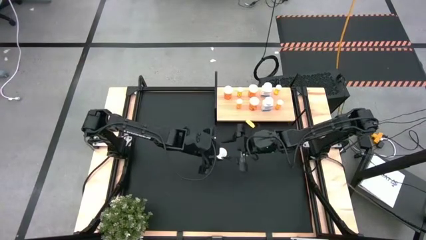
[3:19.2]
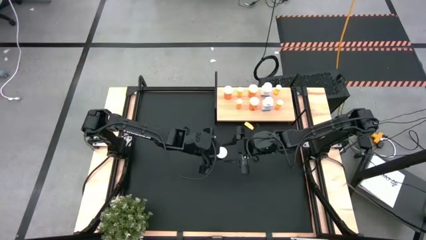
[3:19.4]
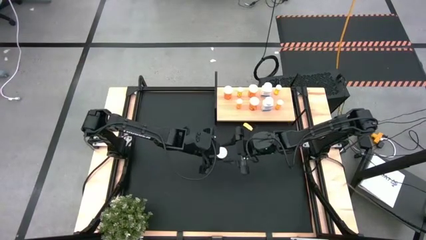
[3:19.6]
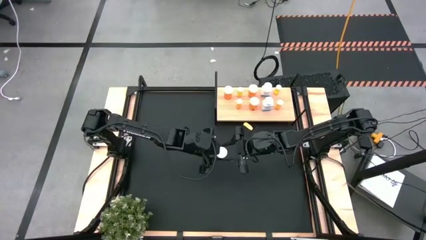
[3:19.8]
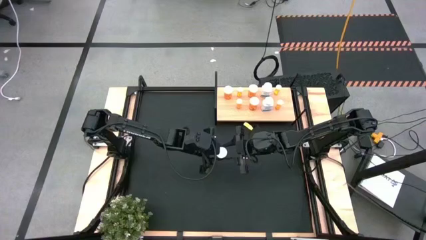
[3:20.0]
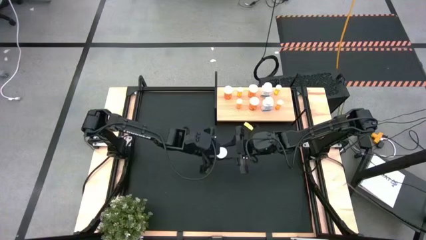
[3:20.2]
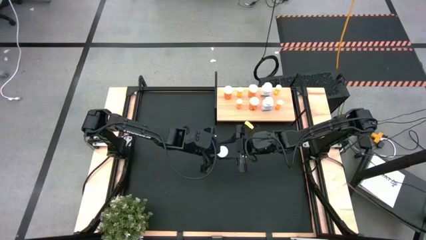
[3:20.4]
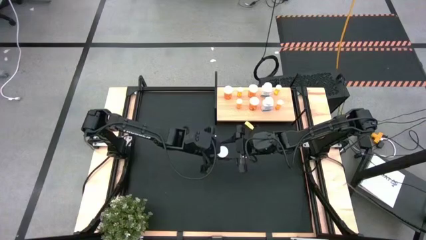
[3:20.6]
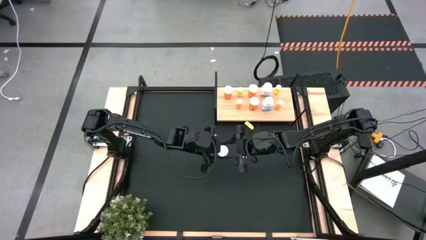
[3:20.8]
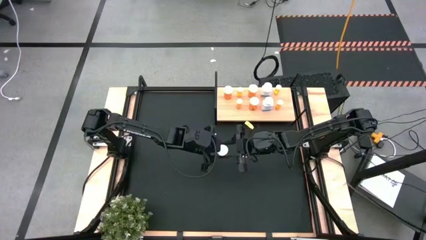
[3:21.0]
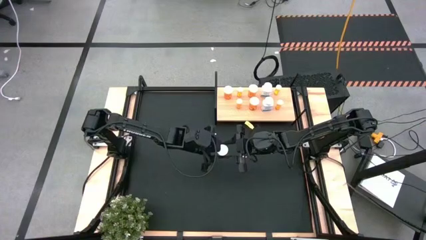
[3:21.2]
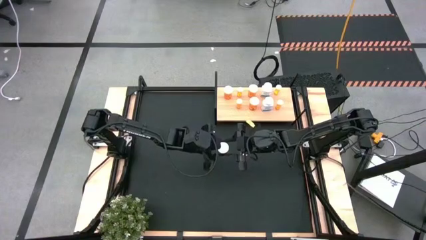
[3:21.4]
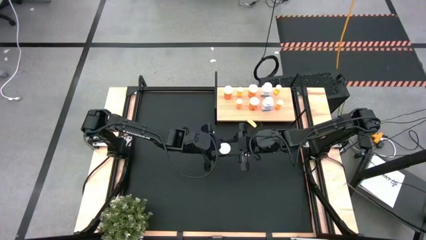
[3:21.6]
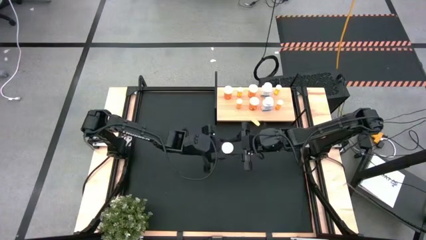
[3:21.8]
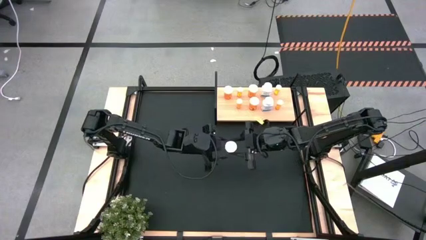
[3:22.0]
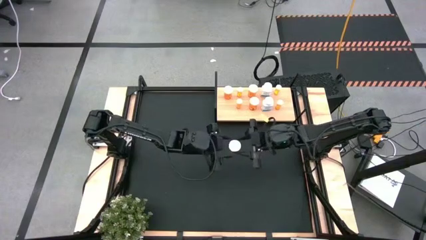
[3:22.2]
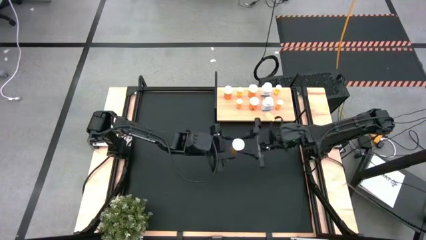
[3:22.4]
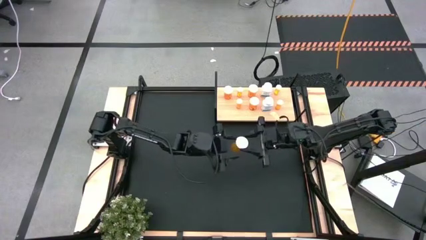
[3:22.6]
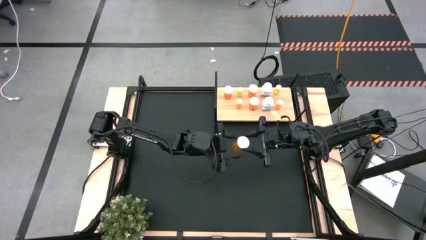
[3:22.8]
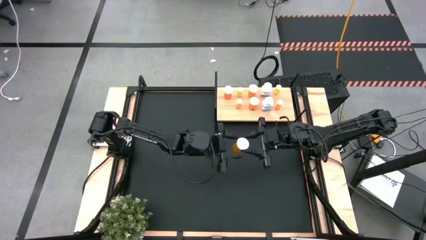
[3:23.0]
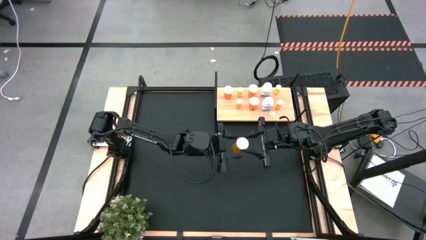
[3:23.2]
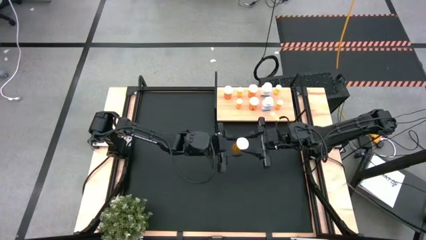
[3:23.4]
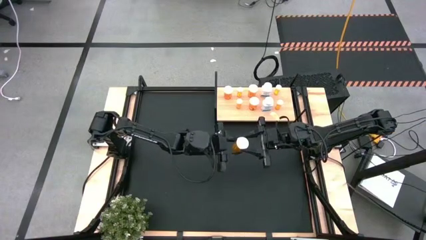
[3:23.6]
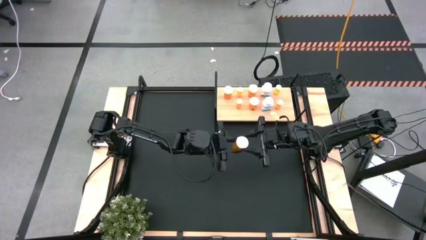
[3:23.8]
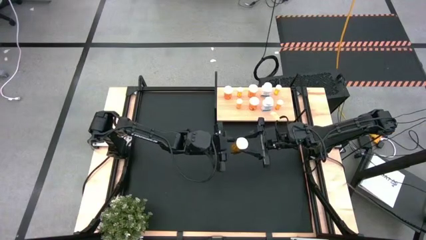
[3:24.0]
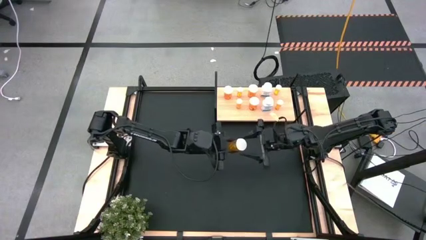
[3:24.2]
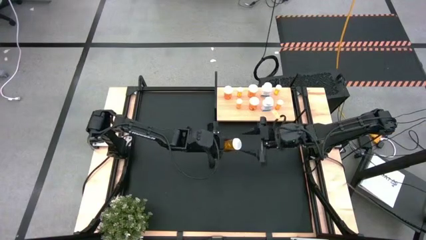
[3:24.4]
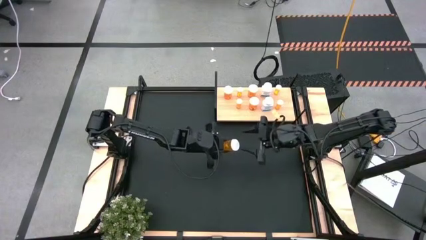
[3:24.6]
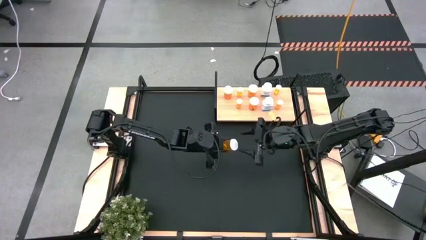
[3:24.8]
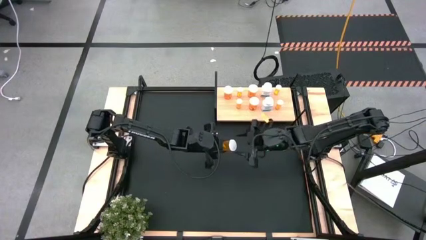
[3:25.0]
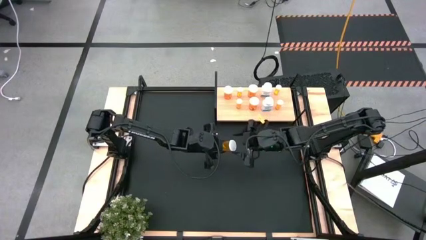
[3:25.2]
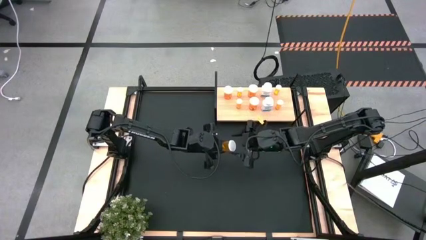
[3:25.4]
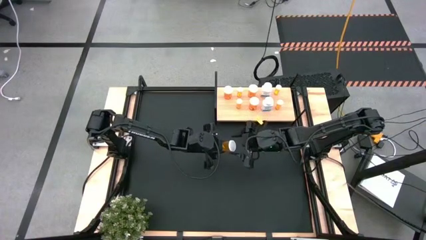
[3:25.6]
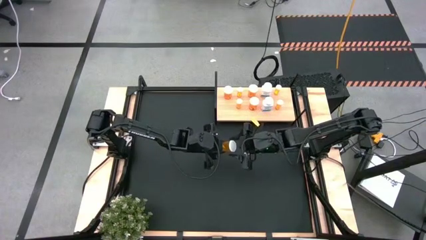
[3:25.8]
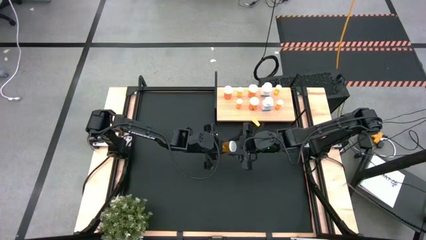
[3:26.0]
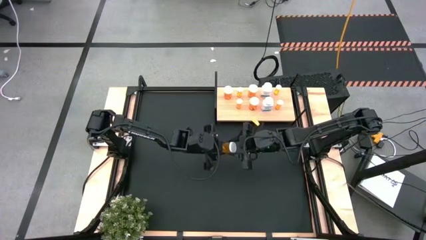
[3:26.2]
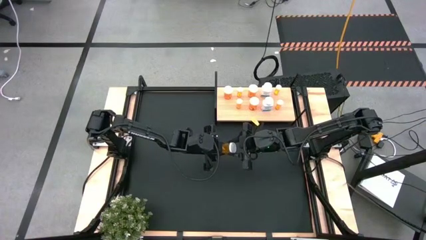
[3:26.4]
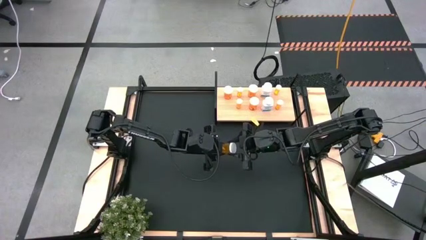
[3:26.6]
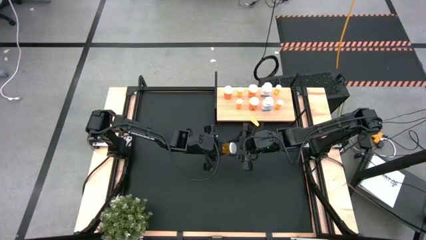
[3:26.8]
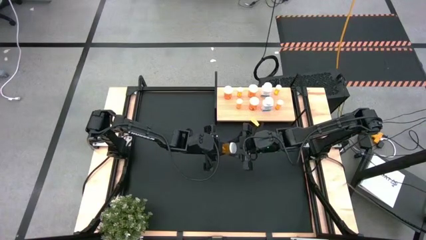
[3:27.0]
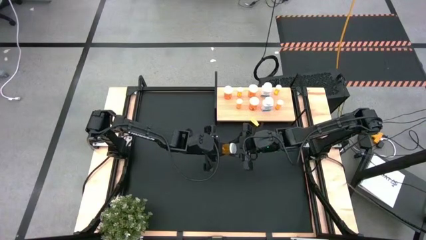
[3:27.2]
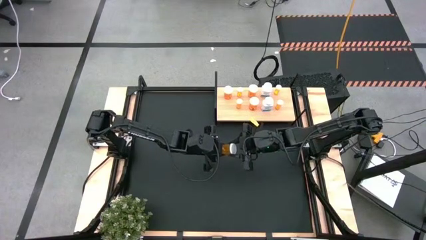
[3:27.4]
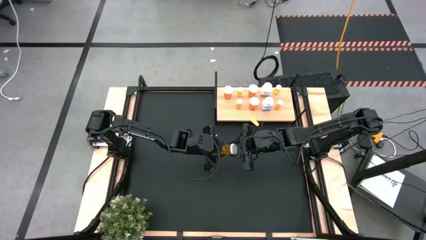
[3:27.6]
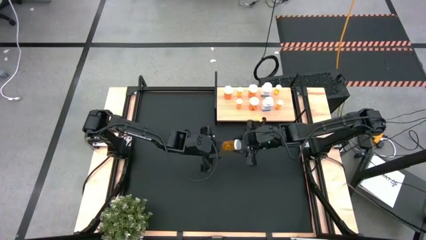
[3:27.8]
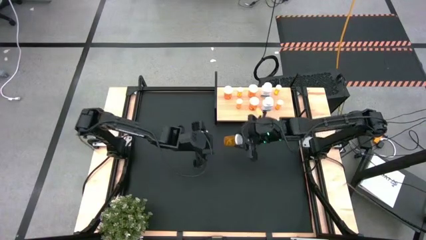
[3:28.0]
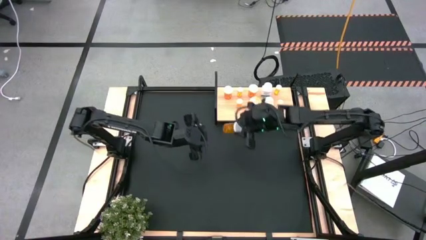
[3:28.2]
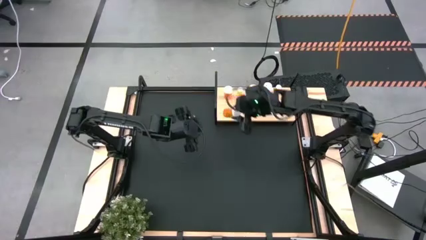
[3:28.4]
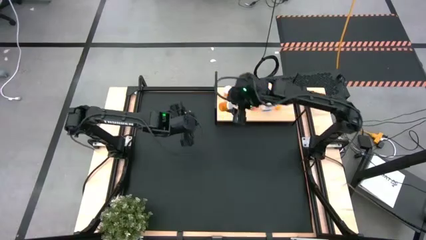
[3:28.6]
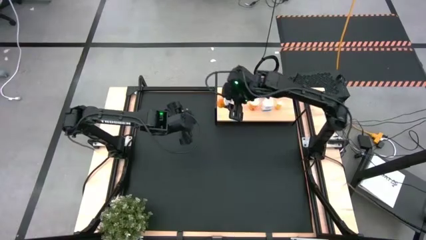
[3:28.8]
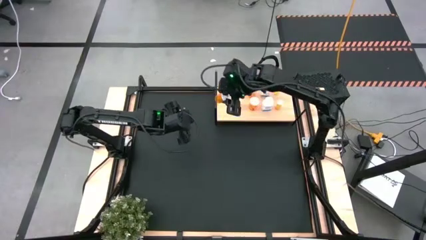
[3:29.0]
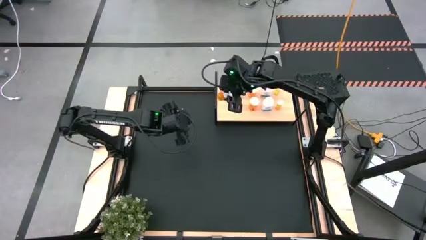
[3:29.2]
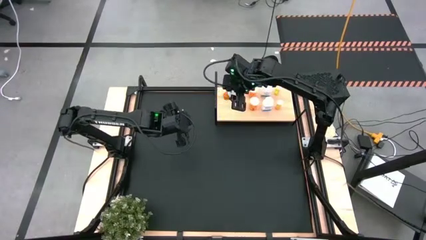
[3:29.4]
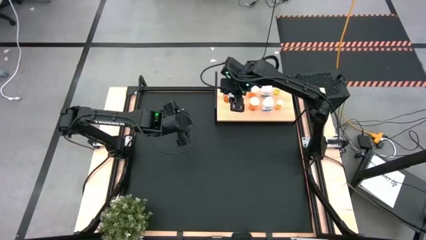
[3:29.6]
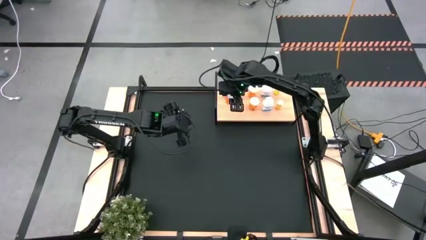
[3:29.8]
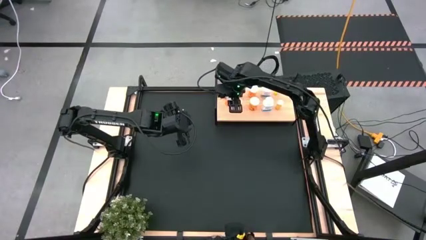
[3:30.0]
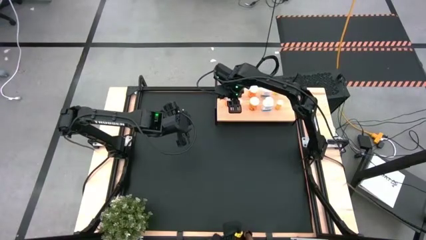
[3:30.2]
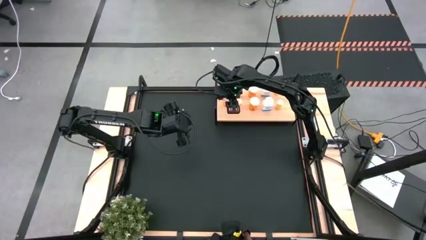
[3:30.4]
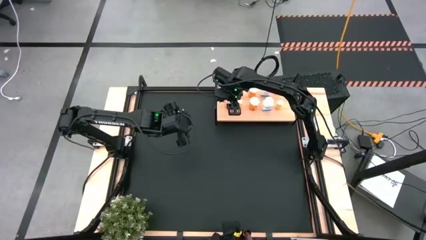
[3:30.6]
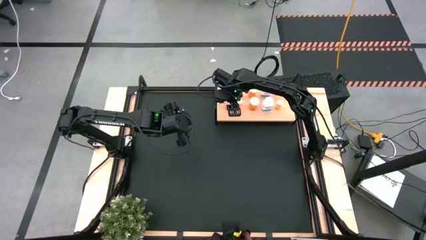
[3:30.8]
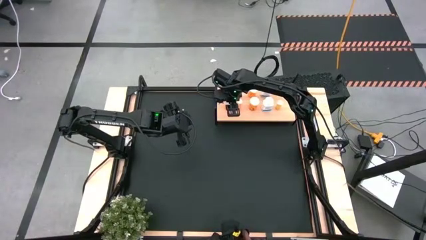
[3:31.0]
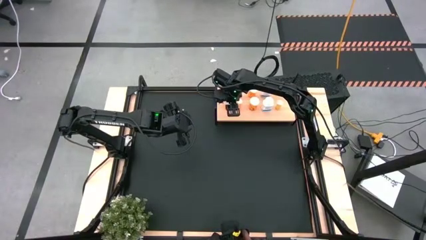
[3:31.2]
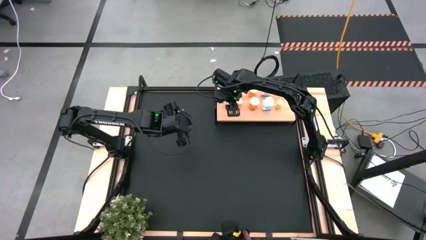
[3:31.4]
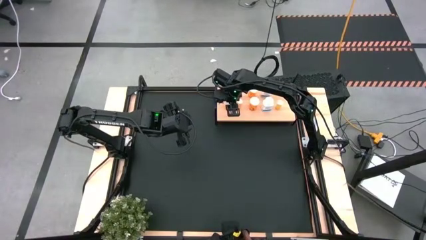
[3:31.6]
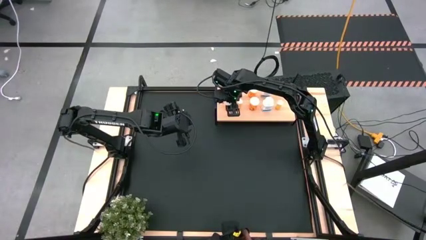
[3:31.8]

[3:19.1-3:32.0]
Task: Pick and place medicine bottles onto shelf by color
Put the large orange pill bottle on the shelf aligned with the other large orange pill bottle

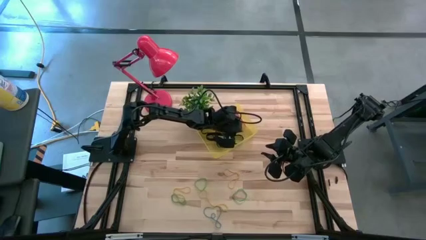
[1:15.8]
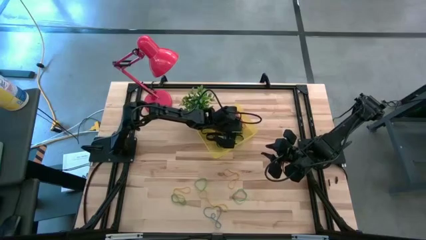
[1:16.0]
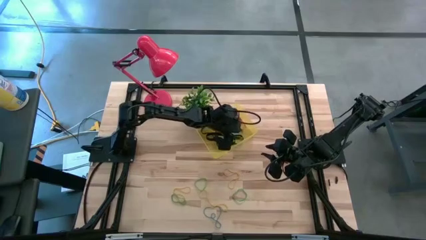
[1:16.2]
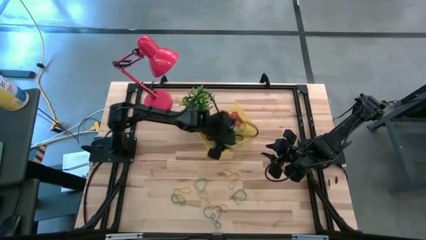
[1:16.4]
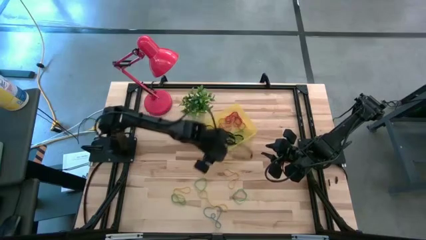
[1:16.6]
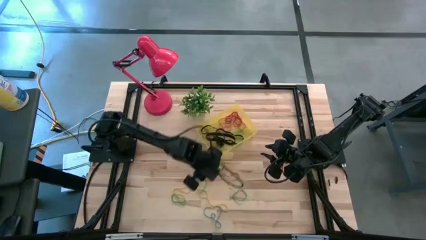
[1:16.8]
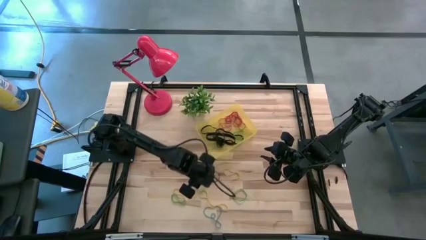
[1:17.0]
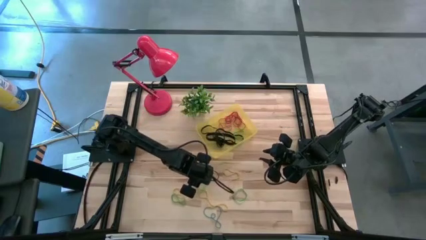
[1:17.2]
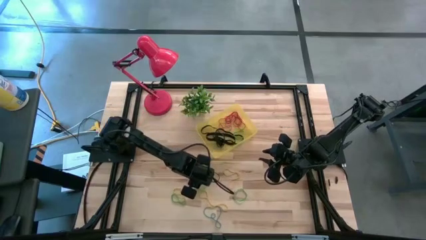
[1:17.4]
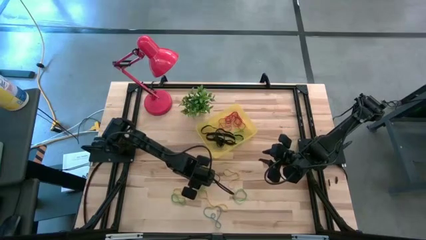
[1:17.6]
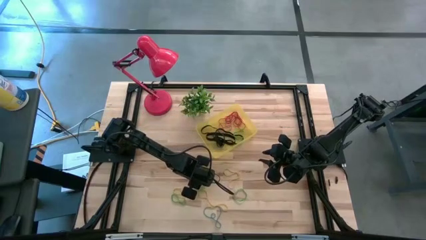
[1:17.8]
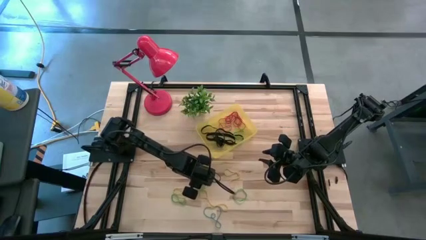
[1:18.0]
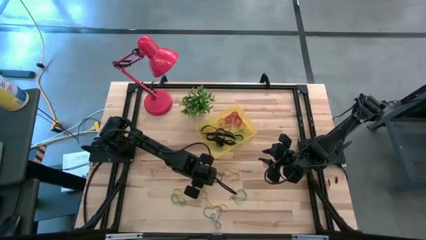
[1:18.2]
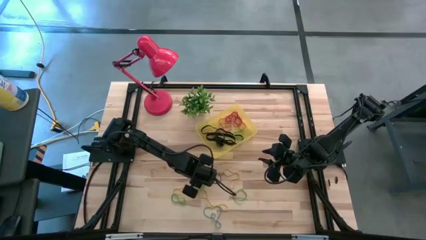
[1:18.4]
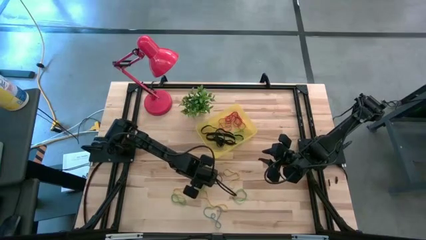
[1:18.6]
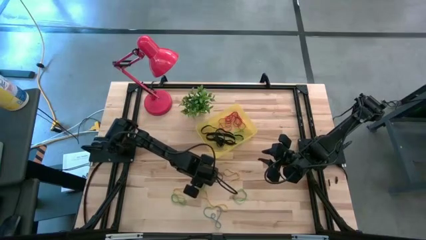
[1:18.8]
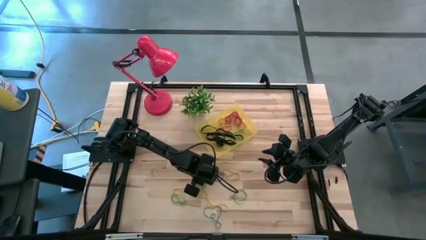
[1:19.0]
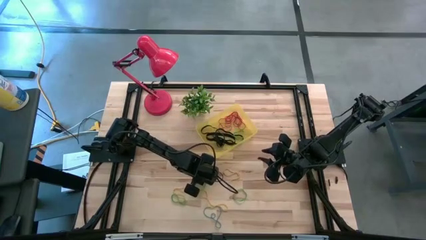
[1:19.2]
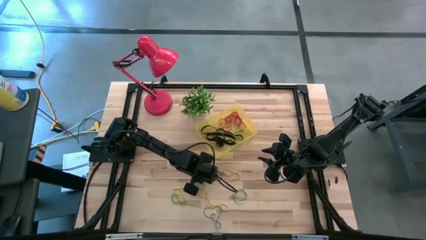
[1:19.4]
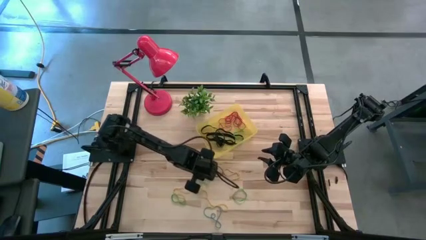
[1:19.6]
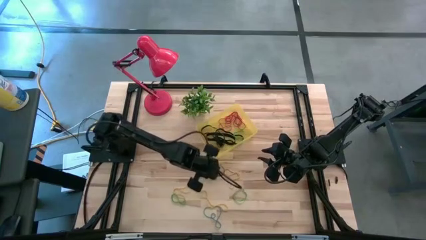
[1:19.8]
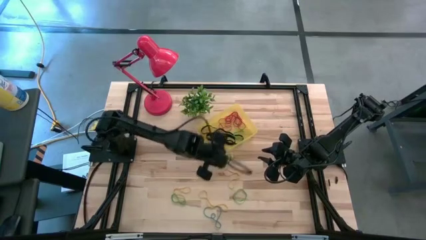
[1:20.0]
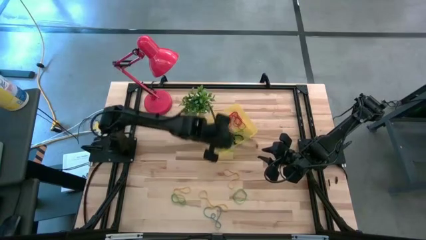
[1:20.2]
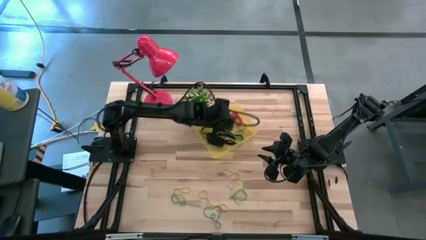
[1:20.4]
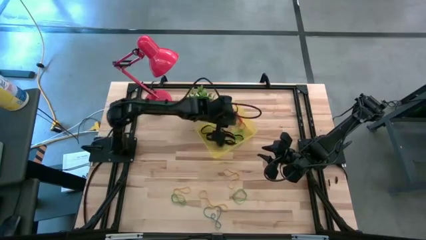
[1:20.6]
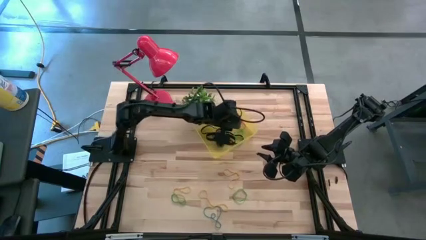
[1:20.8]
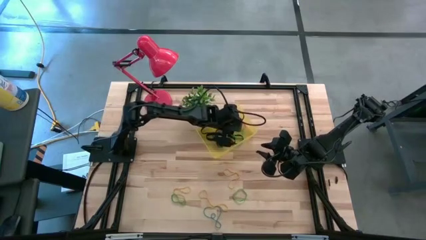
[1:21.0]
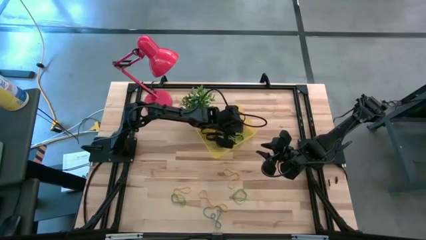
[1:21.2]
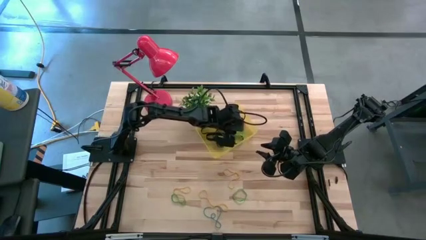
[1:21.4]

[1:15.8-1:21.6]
Task: Pick and place rubber bands into bin
Put the green rubber band into the transparent yellow bin
